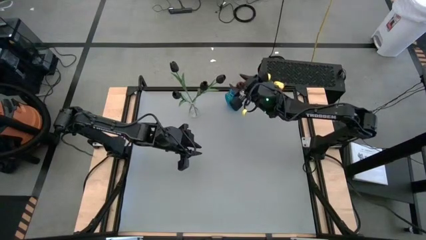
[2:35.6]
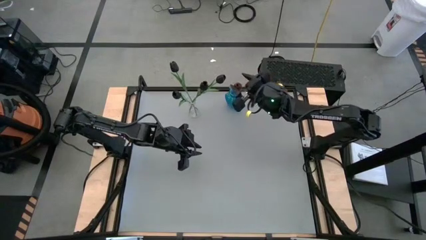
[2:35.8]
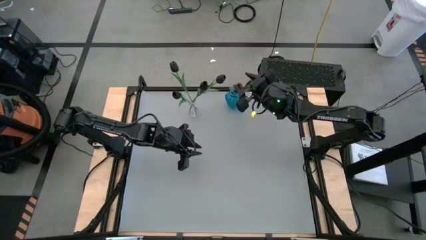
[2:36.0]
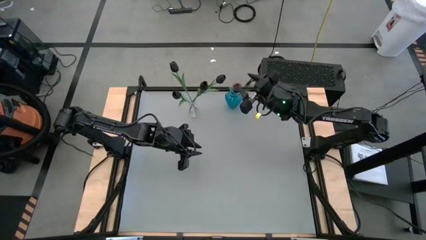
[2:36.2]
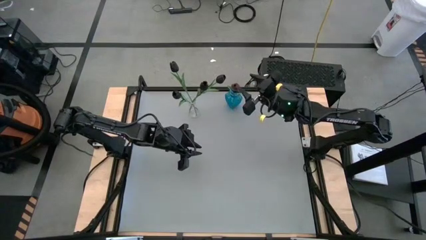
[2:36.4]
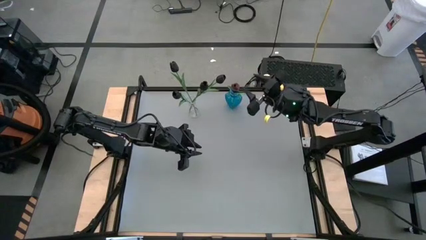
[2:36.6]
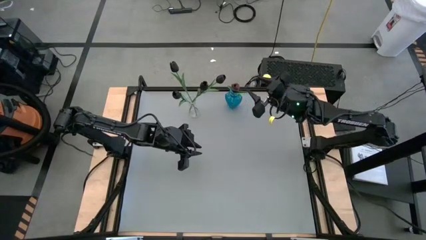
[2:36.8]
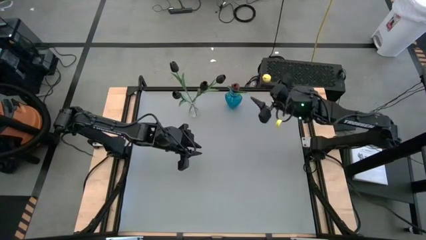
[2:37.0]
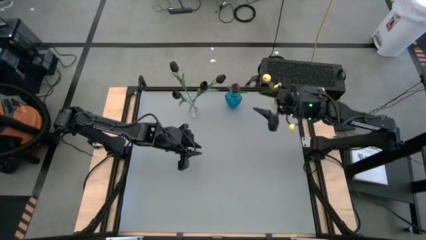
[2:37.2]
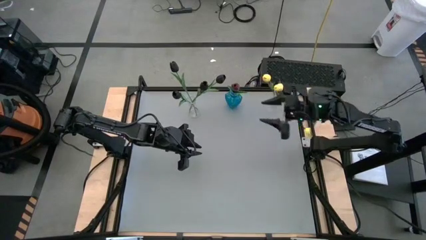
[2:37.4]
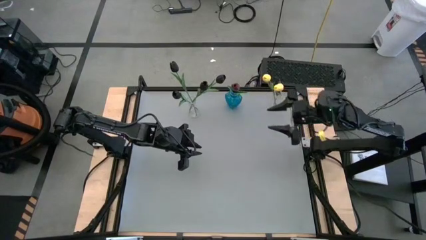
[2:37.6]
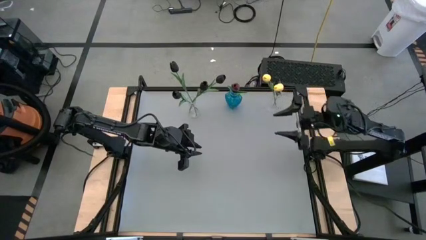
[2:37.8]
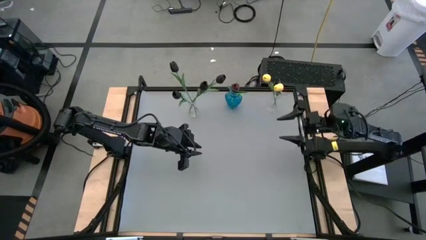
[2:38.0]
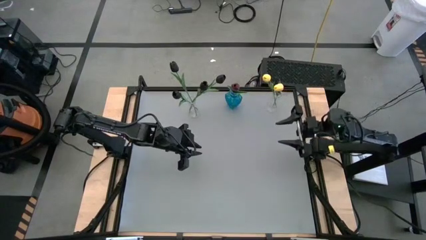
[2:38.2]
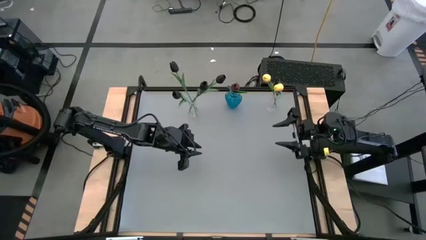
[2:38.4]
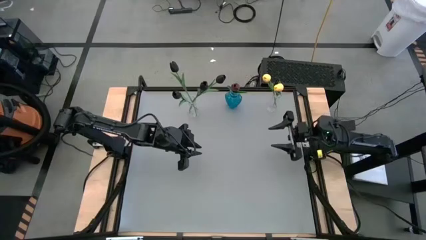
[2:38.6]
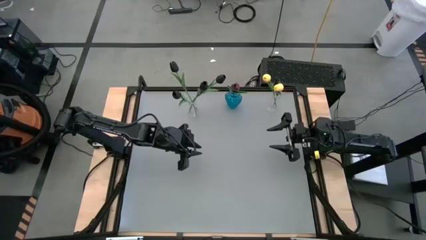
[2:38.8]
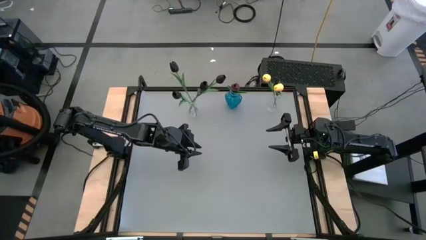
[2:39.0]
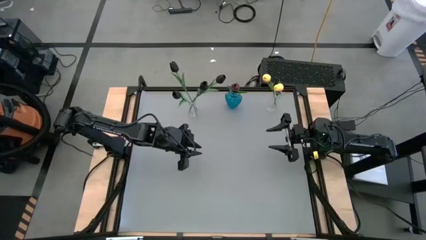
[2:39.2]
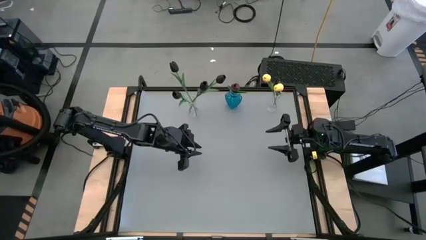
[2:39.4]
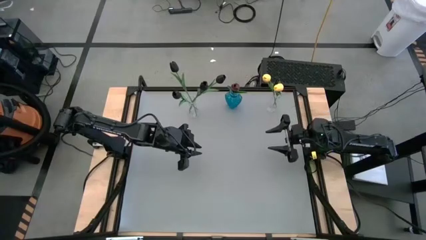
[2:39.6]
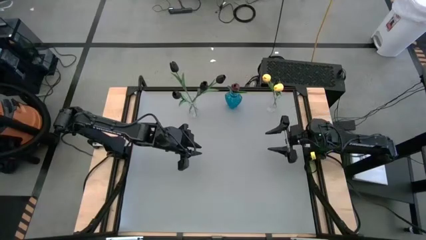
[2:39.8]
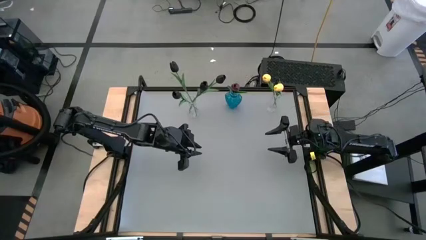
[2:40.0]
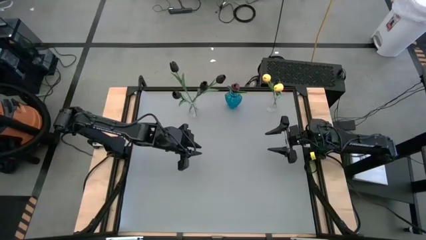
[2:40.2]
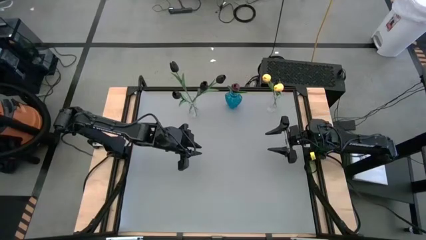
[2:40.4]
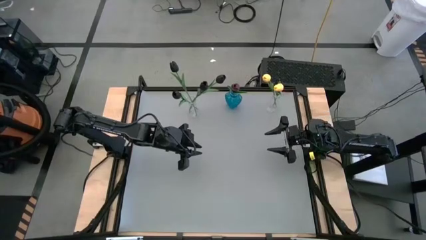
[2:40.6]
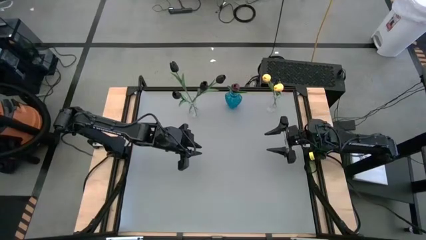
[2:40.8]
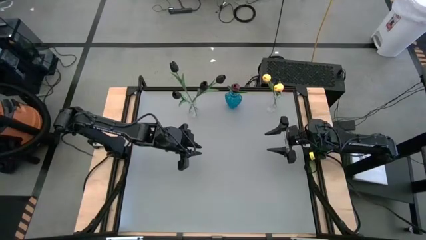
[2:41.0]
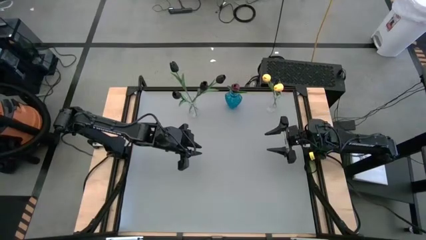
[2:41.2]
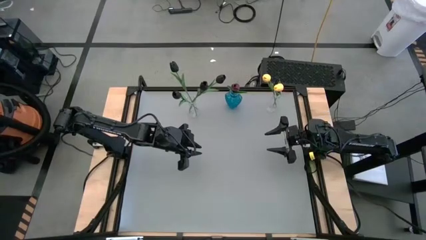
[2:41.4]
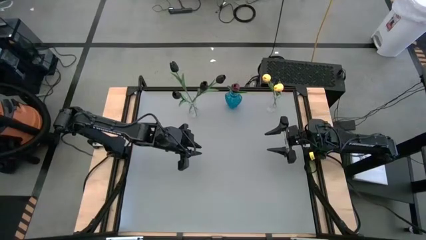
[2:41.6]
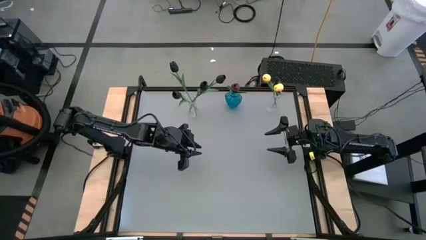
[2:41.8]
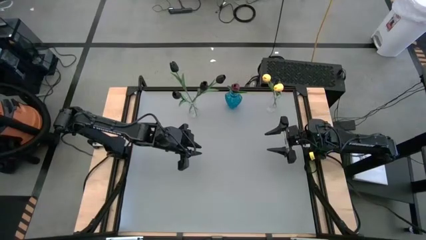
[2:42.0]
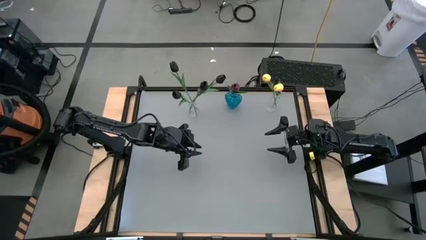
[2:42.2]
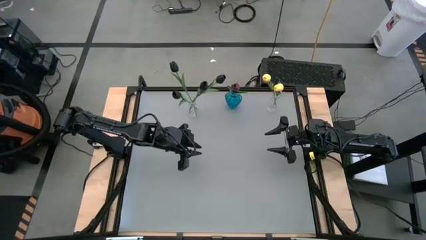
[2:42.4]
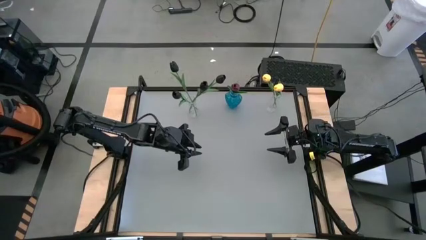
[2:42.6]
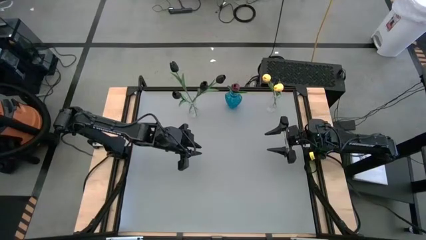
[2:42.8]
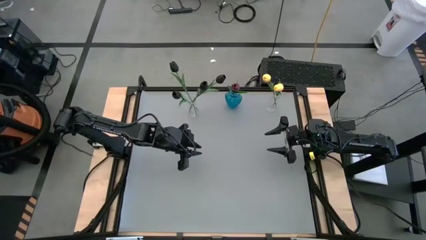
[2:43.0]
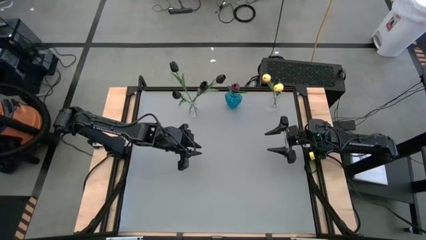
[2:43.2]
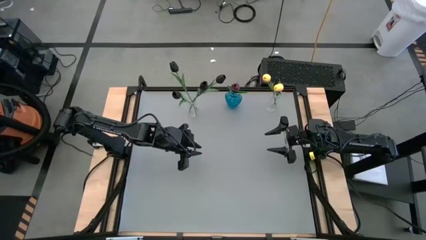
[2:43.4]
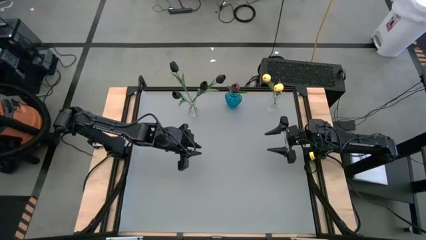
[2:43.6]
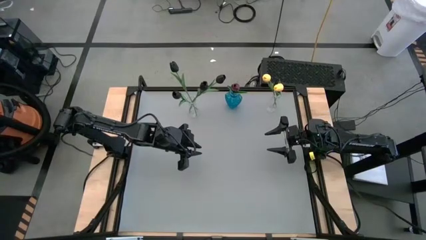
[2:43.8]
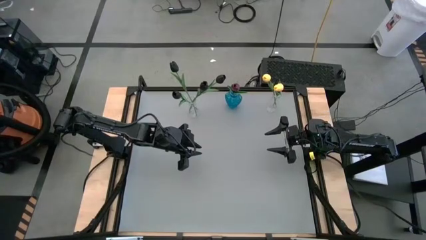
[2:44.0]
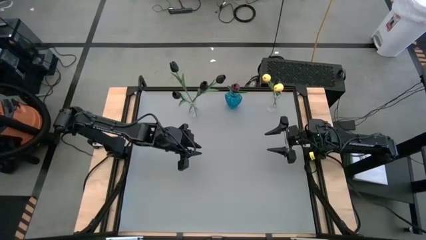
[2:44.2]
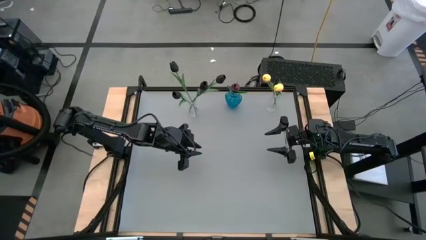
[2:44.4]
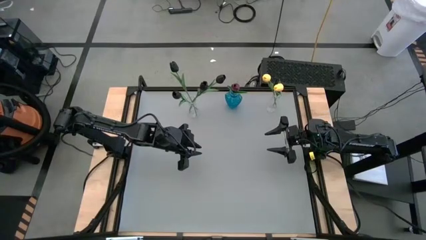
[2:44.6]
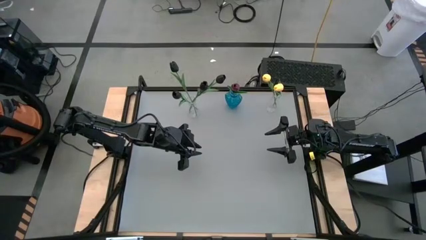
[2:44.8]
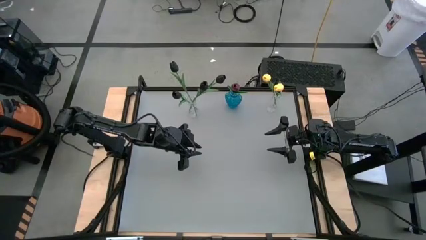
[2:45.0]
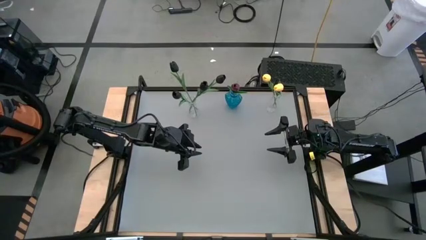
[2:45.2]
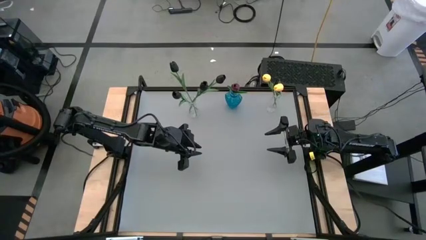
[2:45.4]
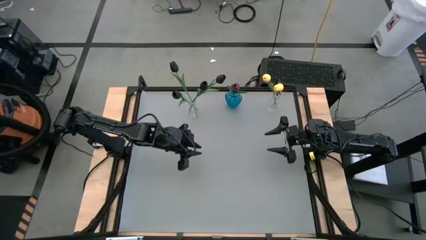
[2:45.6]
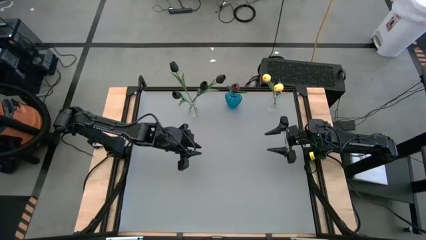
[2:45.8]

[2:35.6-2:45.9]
Task: Sort flowers into vase by color
Return to Home Position

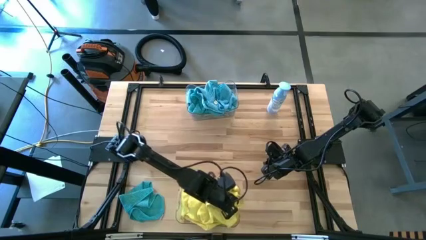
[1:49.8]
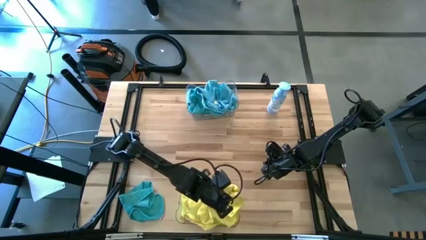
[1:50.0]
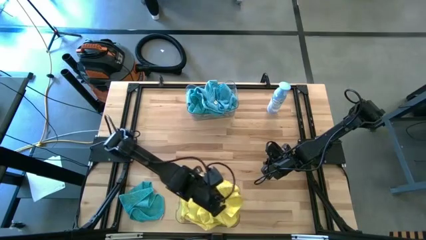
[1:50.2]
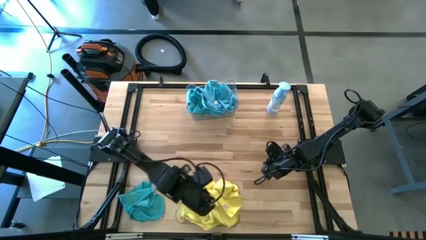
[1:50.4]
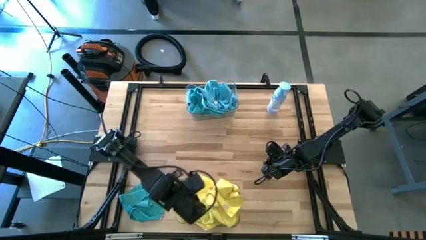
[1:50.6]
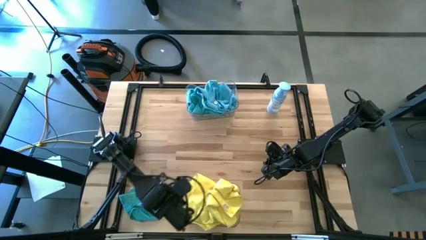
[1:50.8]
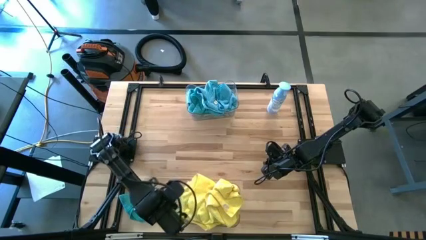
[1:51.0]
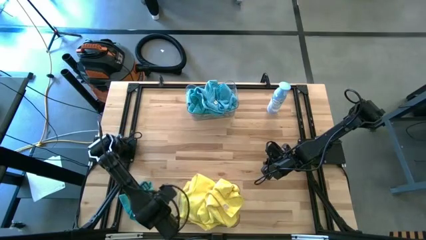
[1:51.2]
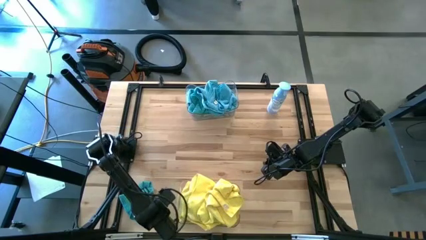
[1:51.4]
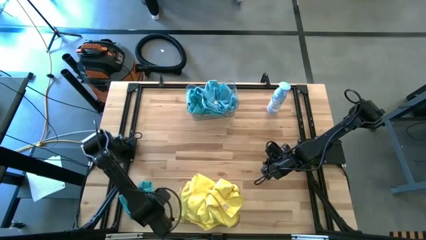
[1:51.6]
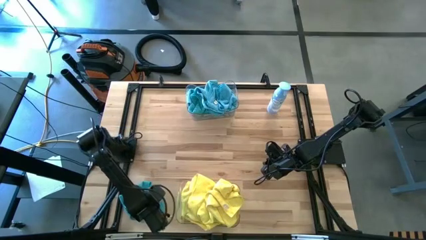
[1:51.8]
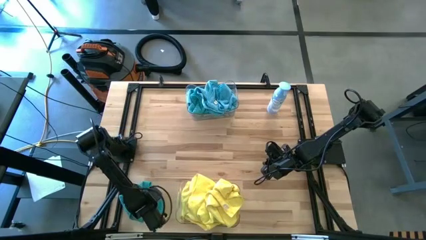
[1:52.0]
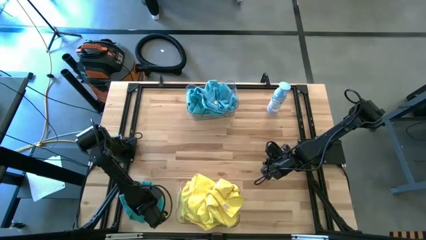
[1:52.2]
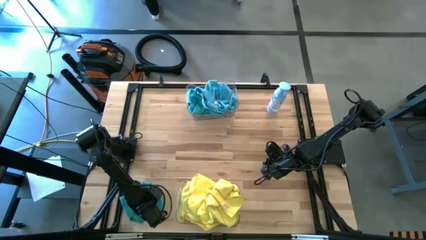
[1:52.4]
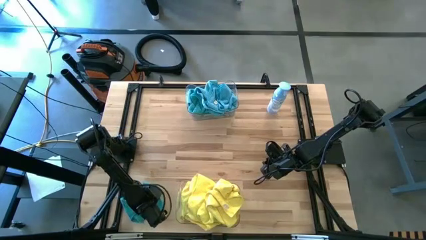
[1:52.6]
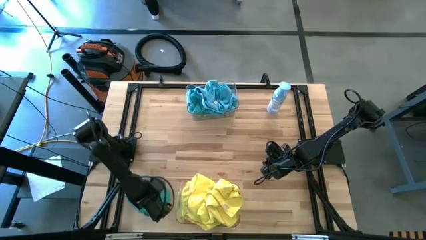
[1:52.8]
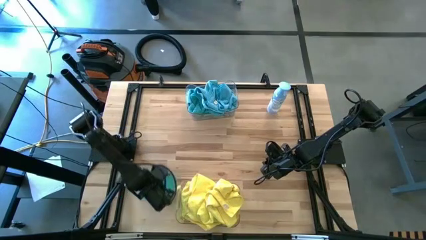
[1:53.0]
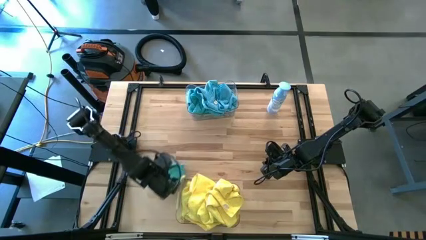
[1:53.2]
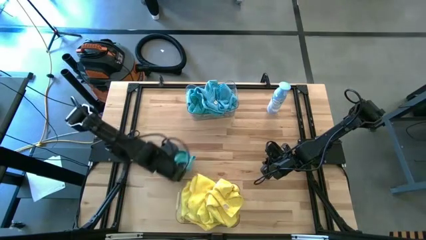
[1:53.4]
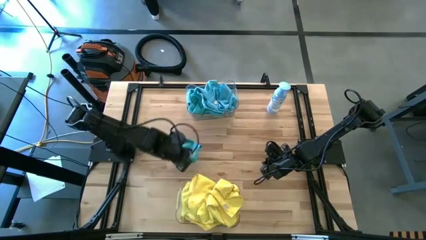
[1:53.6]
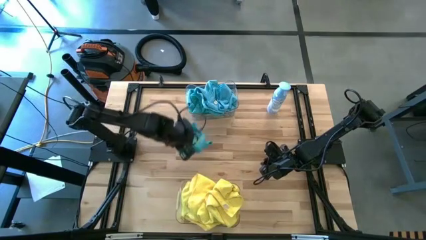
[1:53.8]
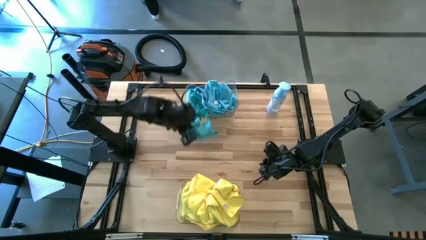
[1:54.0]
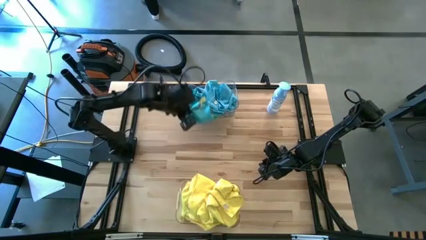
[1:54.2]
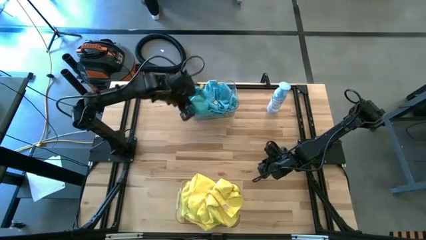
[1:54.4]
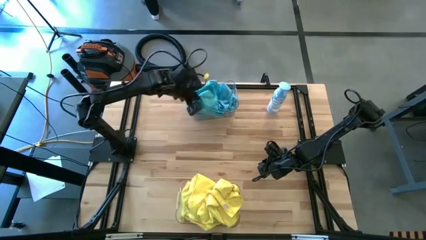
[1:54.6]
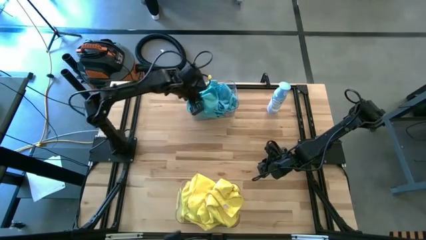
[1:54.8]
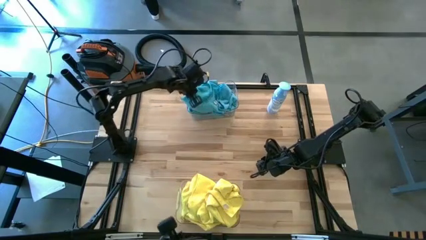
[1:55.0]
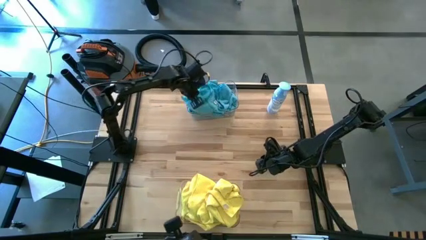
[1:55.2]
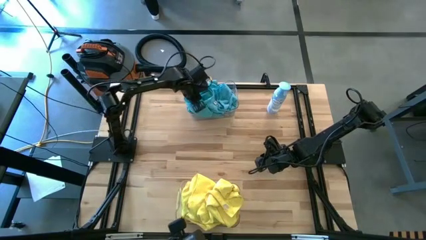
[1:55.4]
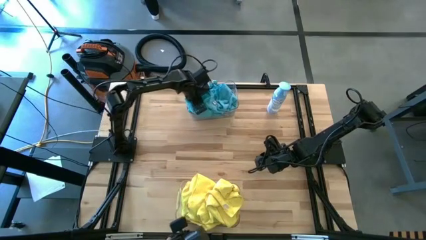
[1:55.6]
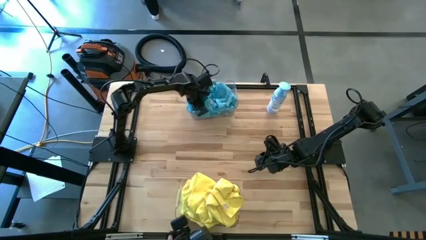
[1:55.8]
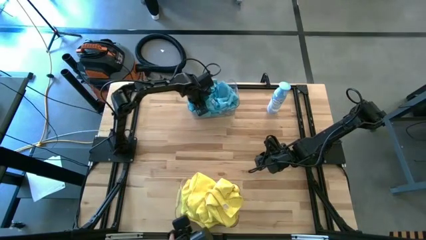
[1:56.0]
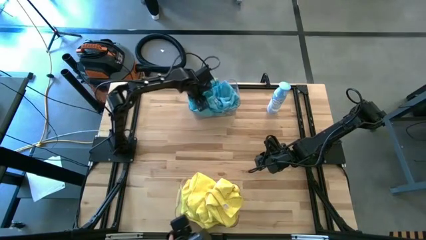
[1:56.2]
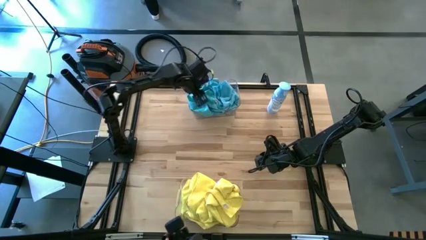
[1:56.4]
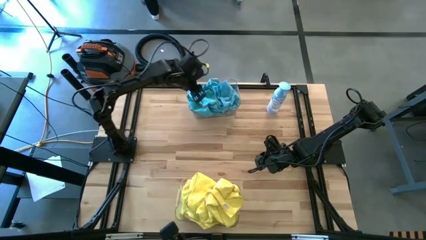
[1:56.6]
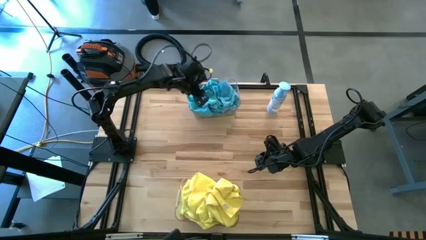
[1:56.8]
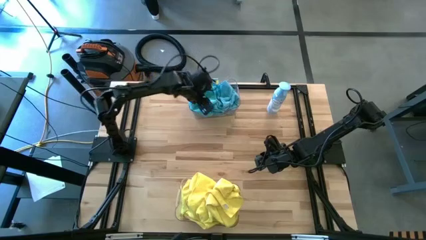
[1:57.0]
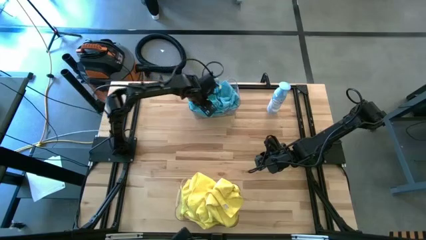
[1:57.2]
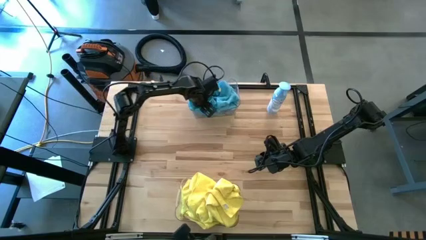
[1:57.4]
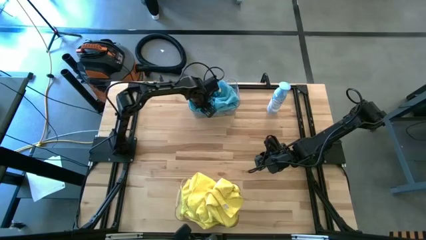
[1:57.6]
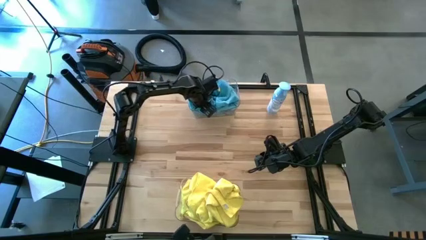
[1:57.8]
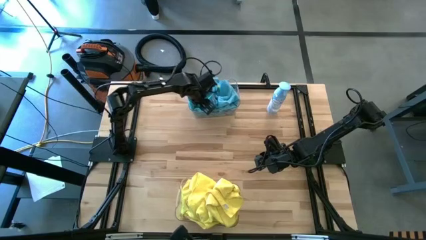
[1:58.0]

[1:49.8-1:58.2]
Task: Sort microfiber towel by color & place in baskets
Put the blue microfiber towel into the top transparent bin
